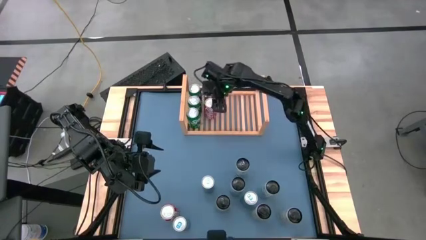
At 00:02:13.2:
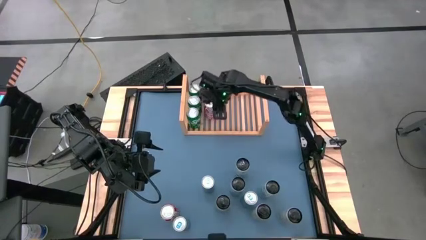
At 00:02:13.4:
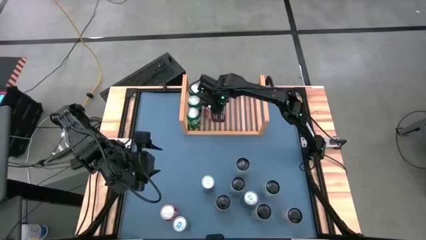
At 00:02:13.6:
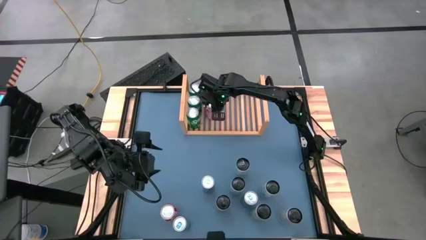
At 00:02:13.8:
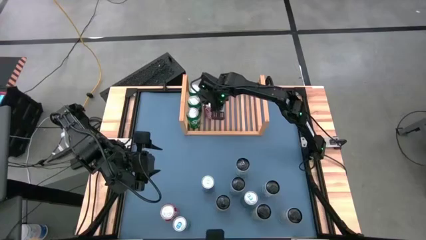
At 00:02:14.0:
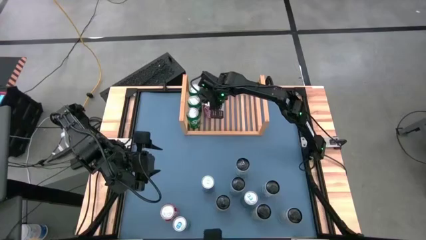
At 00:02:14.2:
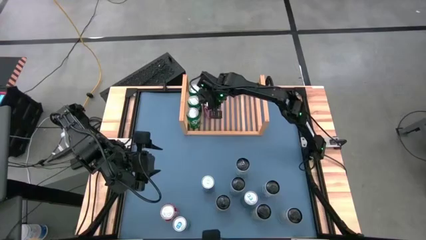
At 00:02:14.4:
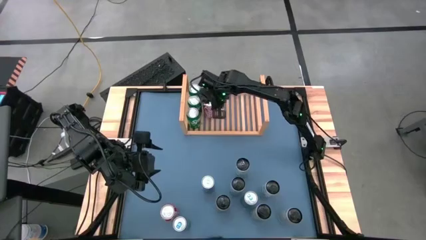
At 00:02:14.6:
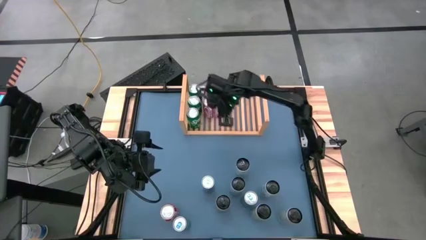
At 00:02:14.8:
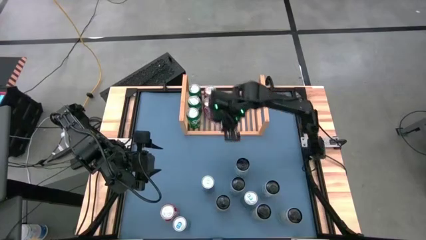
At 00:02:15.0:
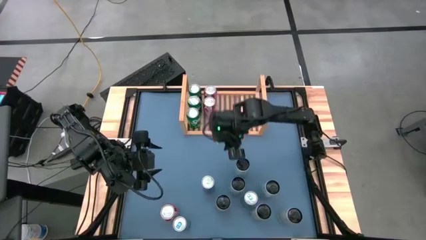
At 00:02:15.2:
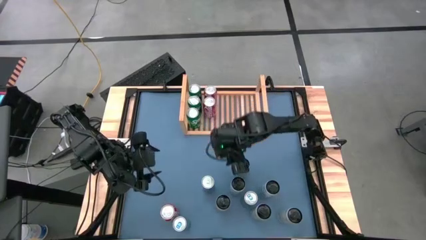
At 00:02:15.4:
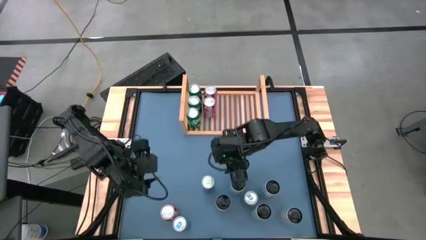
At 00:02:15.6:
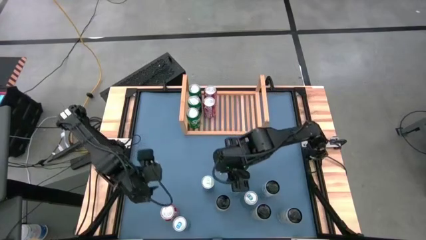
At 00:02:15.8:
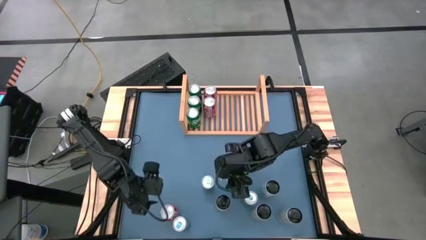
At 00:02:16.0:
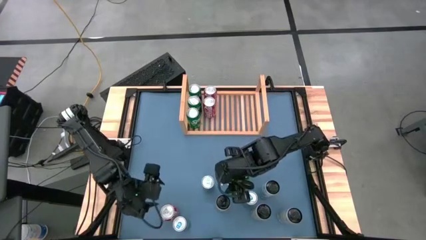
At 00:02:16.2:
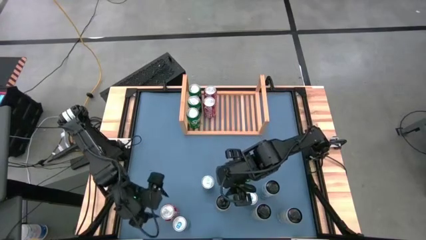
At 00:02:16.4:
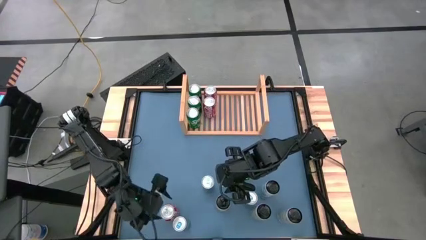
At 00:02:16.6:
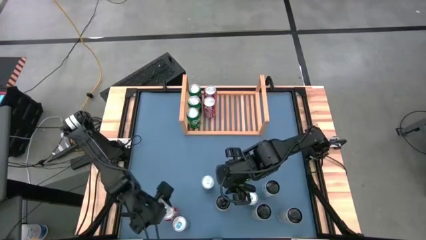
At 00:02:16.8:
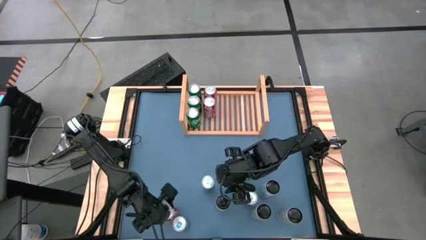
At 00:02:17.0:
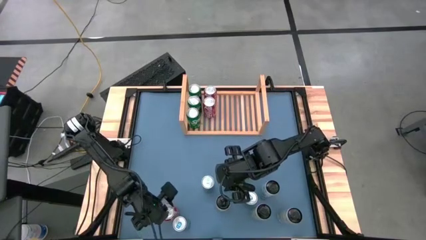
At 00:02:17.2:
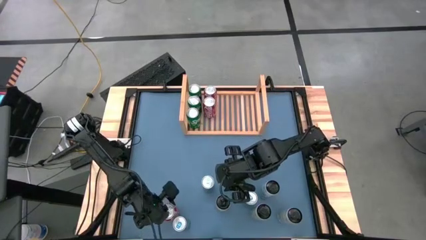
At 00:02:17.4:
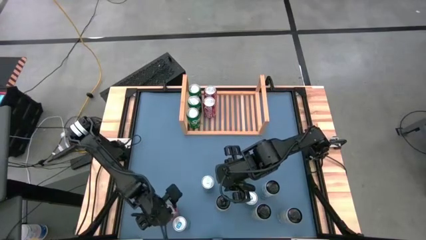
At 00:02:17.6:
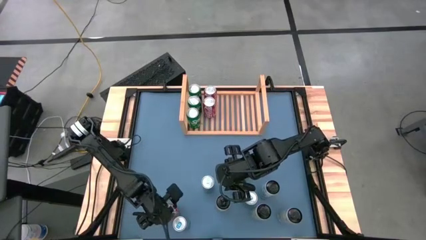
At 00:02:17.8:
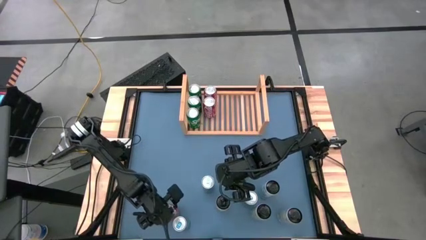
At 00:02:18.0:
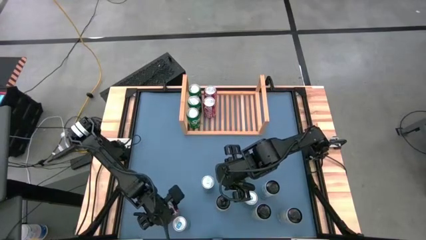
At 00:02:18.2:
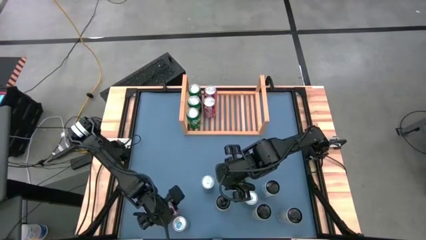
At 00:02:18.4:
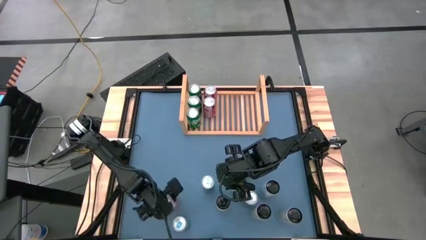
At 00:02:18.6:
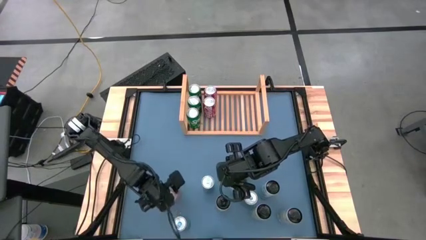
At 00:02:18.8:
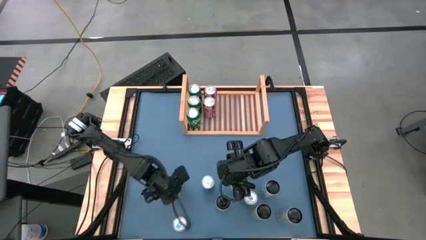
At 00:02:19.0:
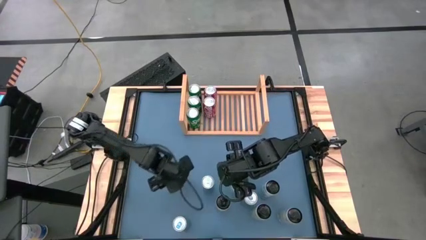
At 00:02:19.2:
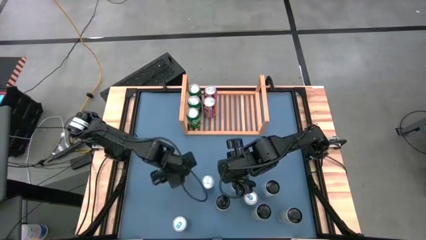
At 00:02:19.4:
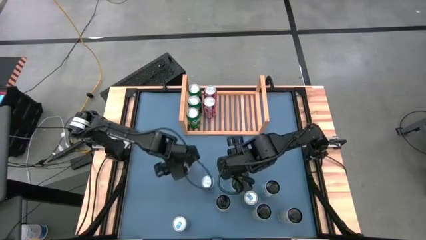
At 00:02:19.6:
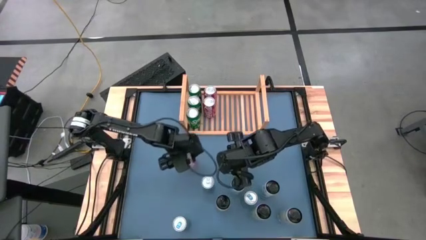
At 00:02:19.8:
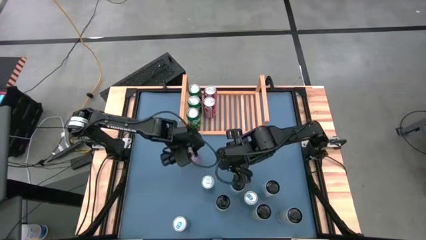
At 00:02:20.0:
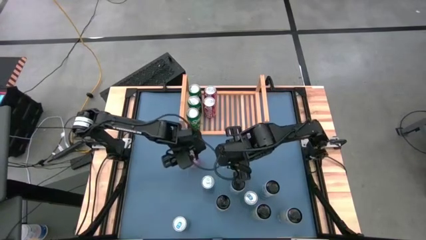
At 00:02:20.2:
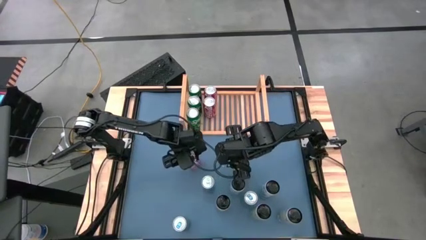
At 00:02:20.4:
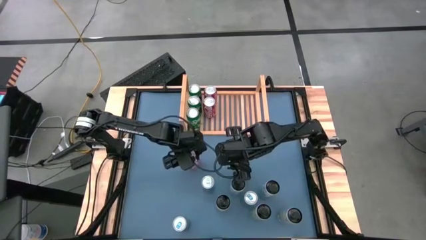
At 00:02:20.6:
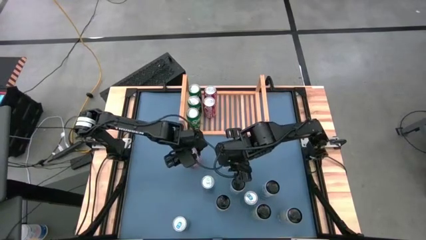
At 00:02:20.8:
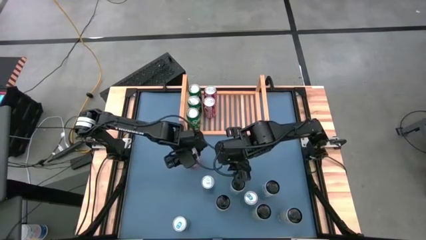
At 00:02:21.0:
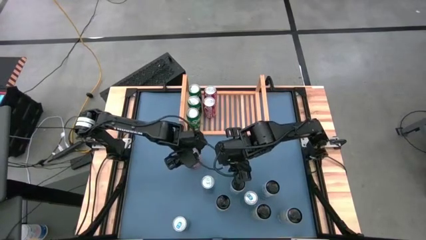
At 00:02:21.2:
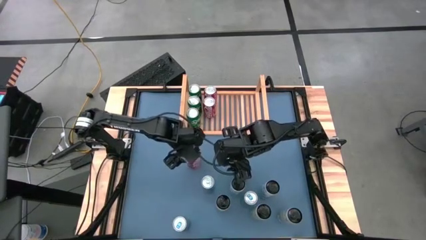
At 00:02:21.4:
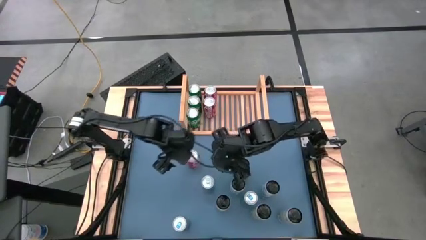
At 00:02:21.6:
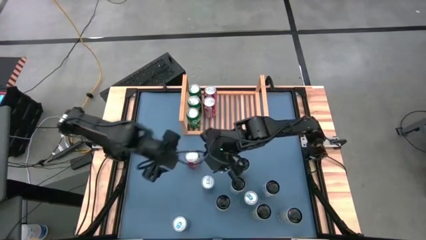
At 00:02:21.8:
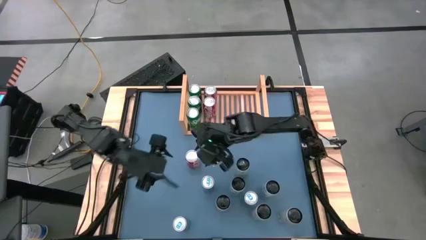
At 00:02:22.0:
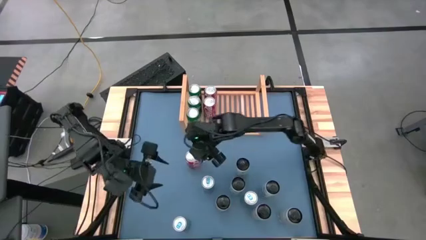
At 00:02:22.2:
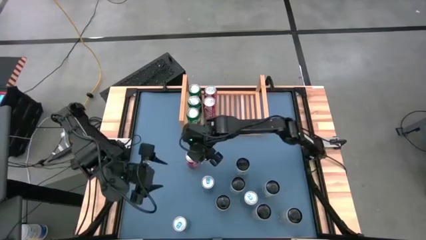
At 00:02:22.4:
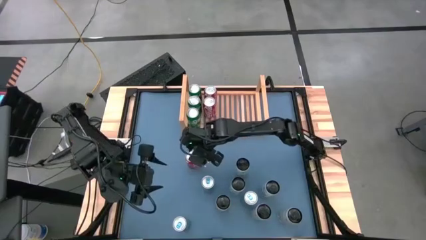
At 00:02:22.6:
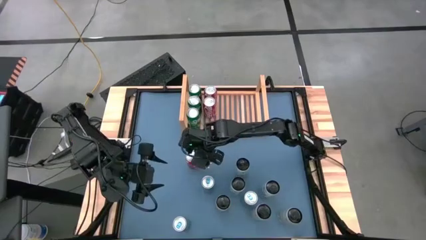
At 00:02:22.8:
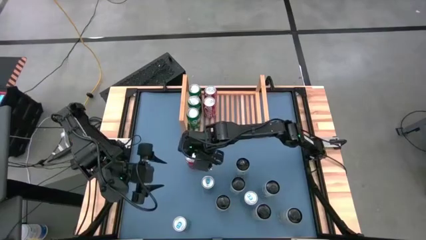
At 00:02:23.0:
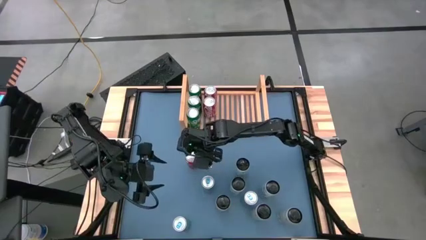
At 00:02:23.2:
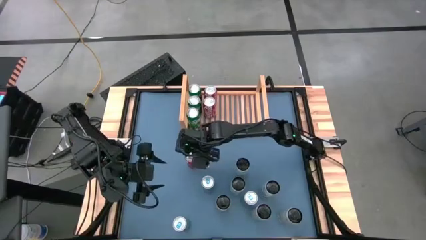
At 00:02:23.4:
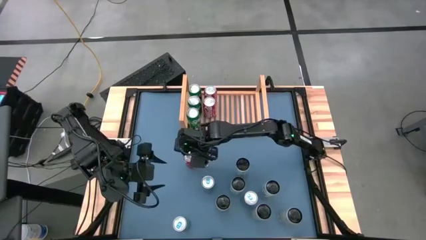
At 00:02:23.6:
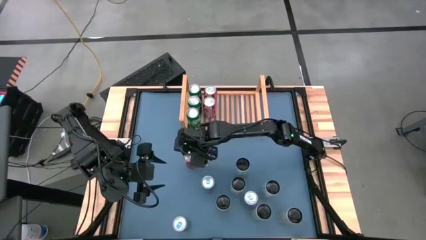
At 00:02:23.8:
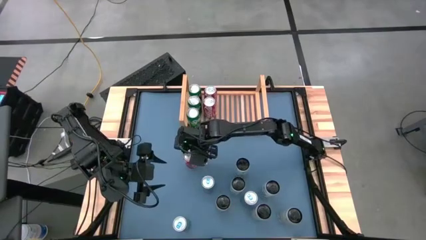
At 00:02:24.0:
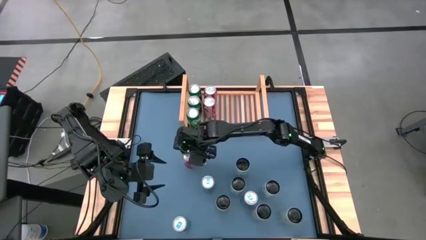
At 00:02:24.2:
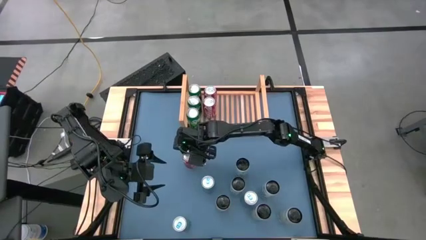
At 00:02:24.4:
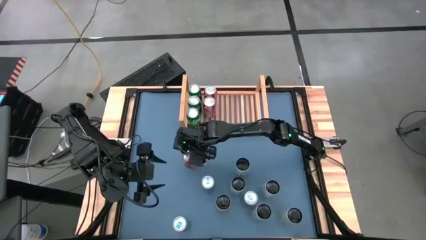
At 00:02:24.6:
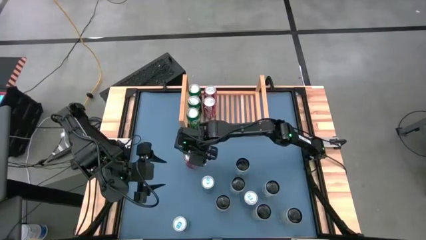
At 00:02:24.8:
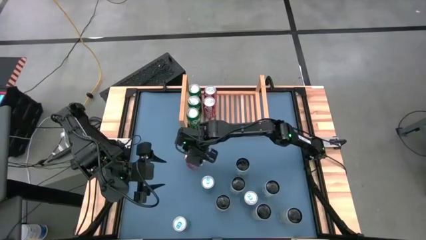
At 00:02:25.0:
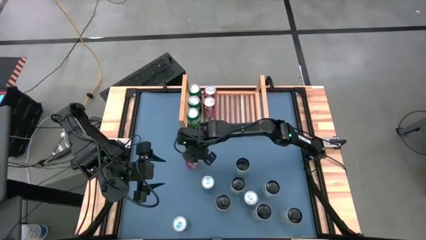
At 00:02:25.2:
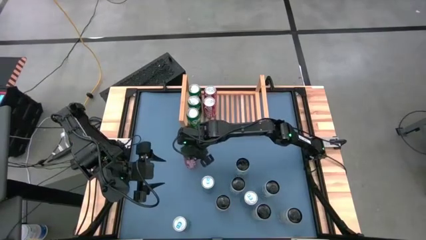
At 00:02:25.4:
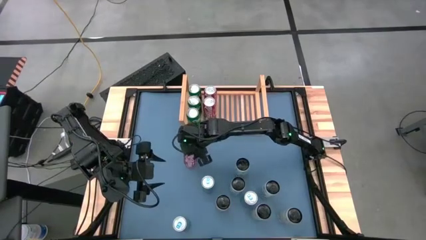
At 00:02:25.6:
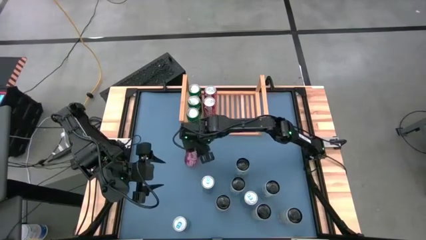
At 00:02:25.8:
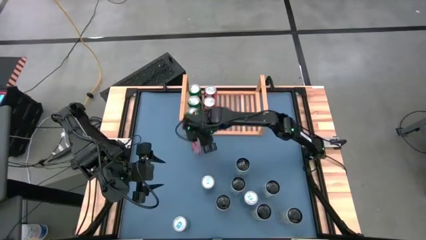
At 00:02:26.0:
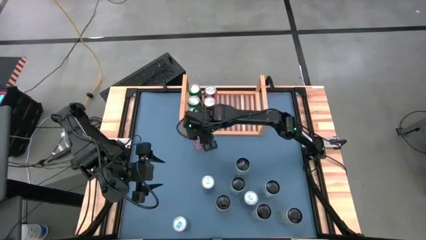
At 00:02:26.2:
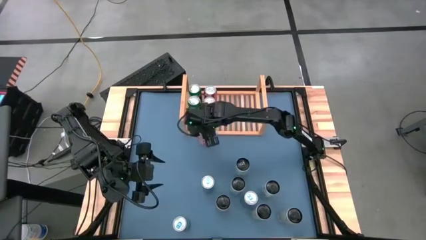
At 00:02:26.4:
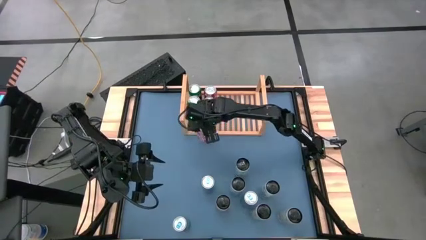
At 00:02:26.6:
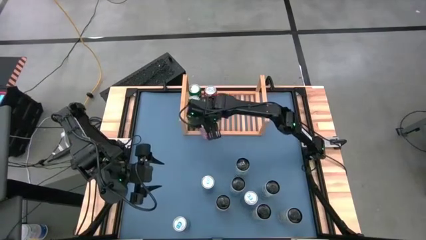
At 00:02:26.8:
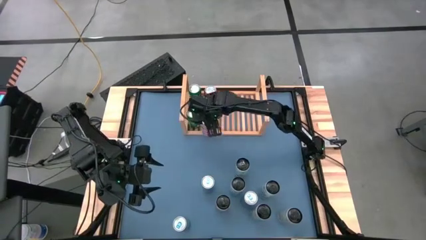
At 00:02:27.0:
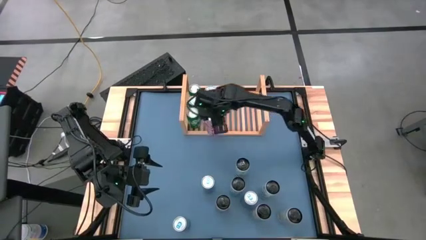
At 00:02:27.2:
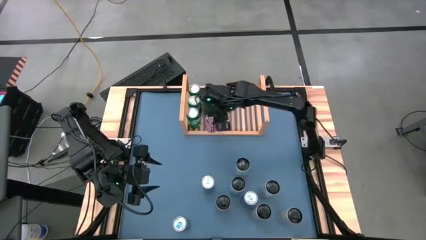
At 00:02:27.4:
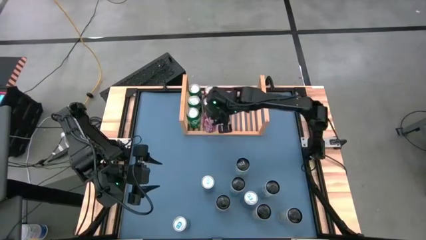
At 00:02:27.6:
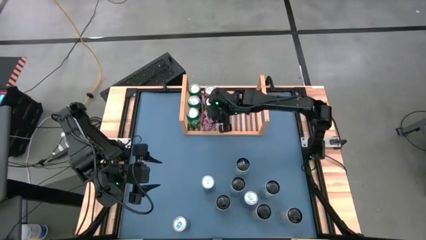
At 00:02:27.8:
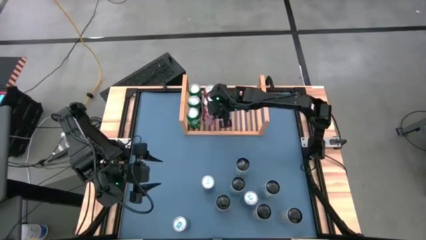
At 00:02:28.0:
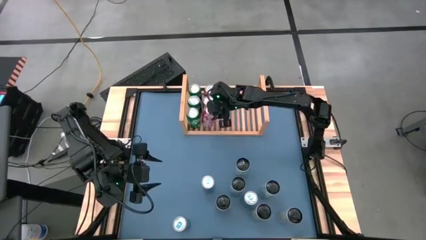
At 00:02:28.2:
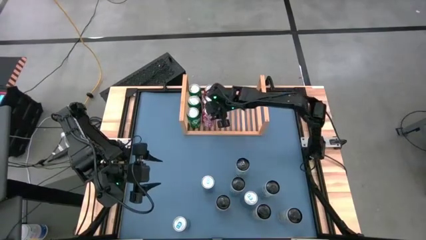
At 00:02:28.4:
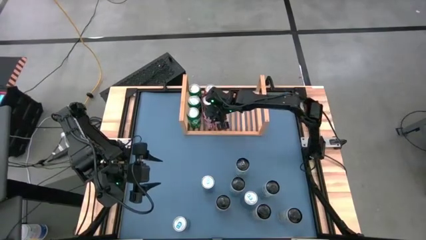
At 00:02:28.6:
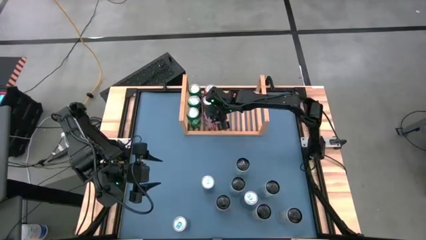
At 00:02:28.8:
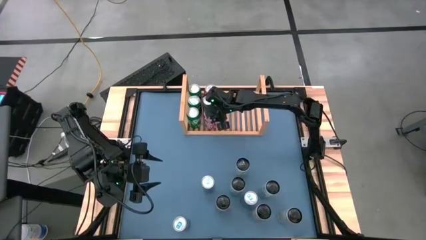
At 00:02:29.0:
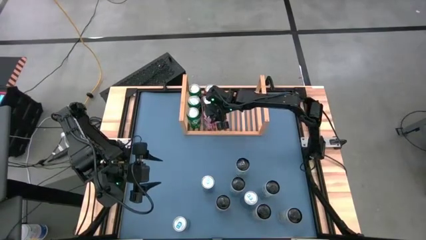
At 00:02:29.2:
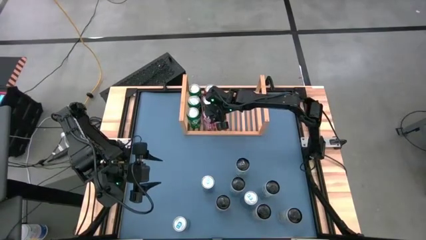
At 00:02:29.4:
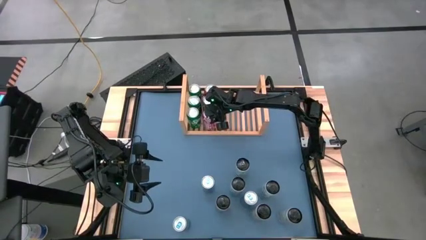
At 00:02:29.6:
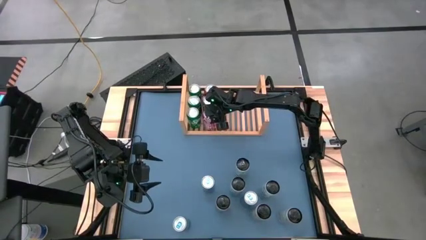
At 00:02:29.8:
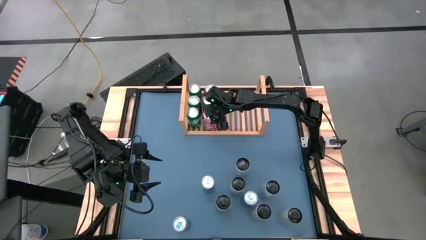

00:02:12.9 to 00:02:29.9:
Task: Place canned beverage on shelf
Put the bottom left red soda can aligned with the red soda on the shelf
